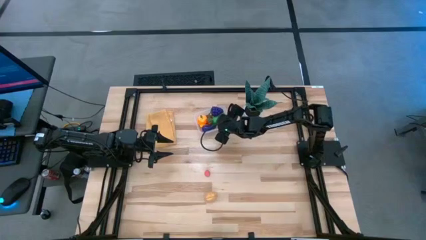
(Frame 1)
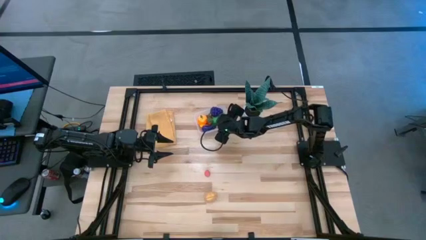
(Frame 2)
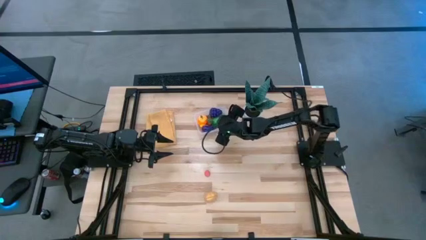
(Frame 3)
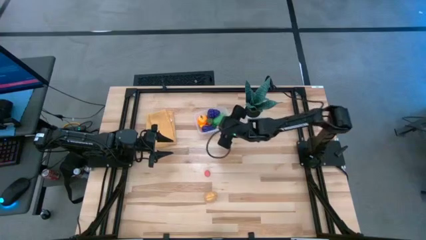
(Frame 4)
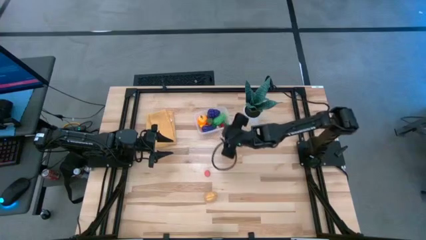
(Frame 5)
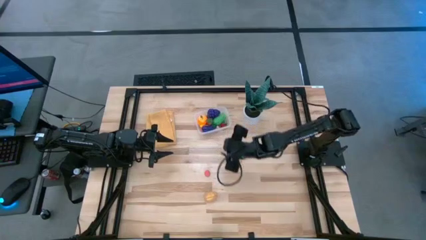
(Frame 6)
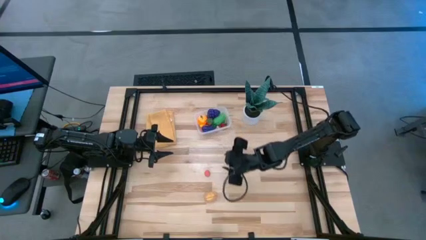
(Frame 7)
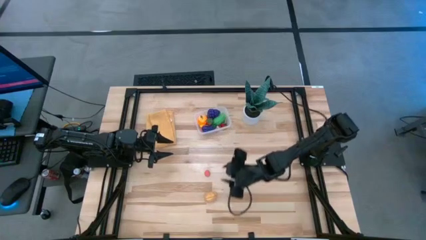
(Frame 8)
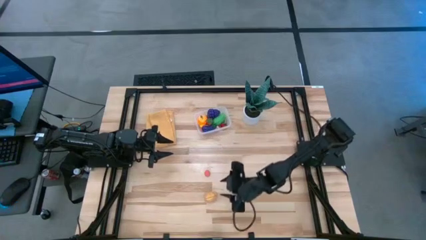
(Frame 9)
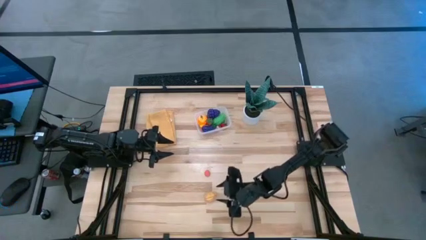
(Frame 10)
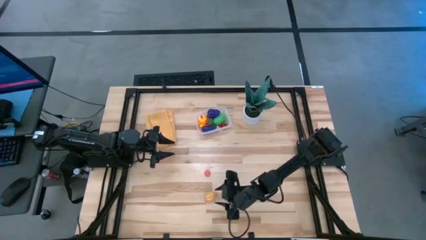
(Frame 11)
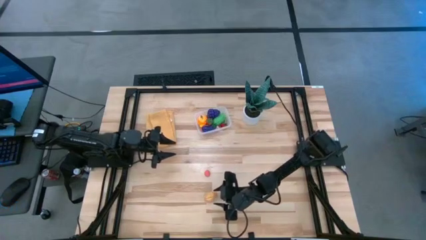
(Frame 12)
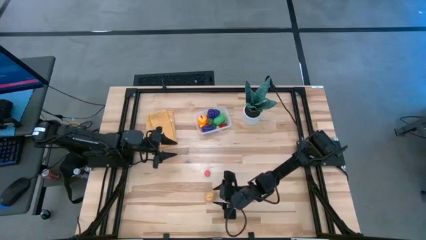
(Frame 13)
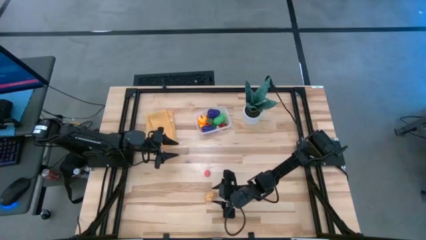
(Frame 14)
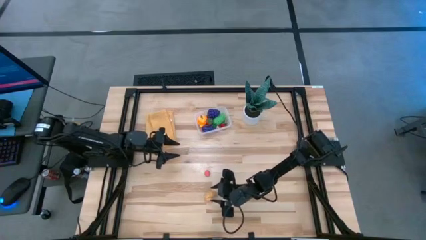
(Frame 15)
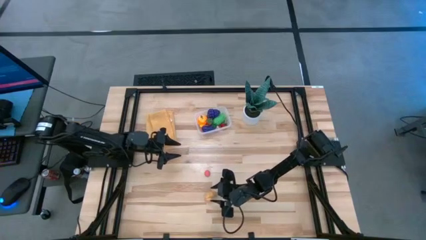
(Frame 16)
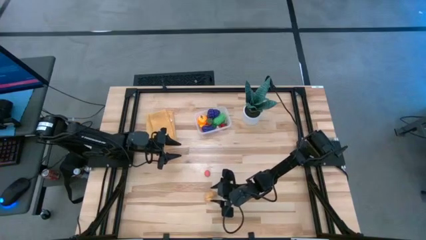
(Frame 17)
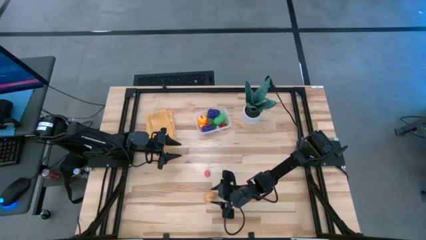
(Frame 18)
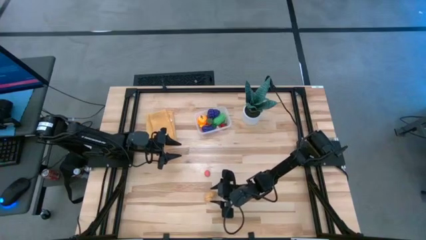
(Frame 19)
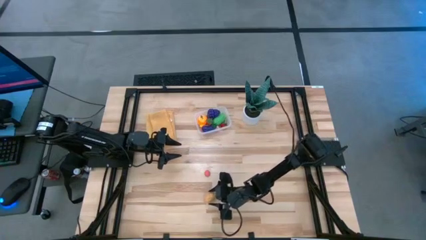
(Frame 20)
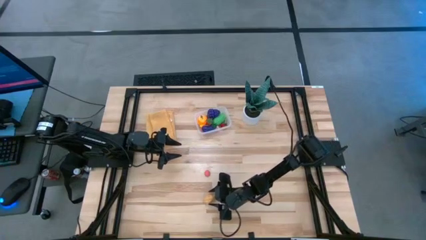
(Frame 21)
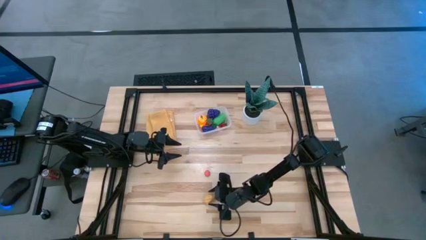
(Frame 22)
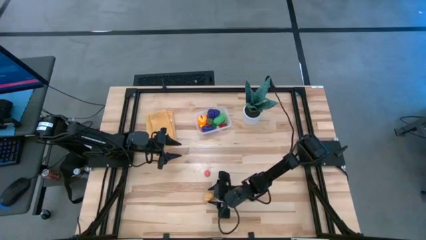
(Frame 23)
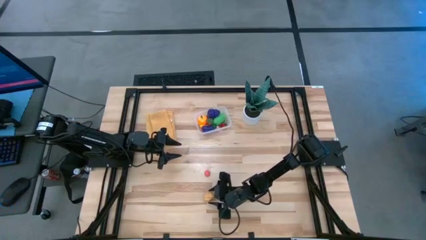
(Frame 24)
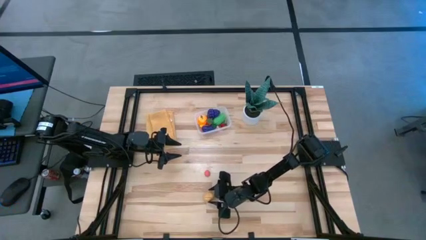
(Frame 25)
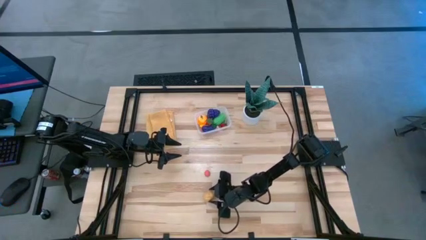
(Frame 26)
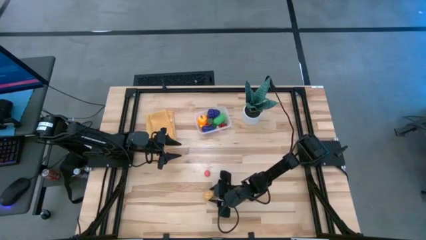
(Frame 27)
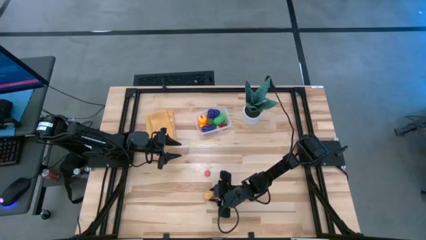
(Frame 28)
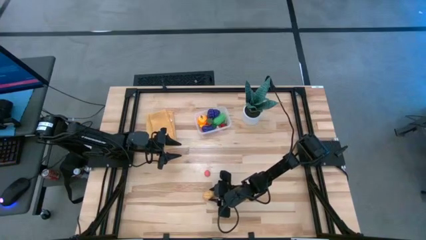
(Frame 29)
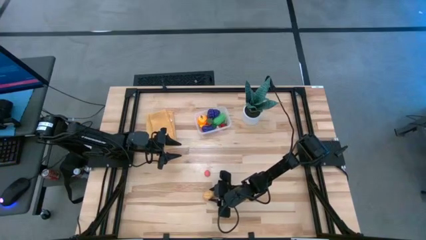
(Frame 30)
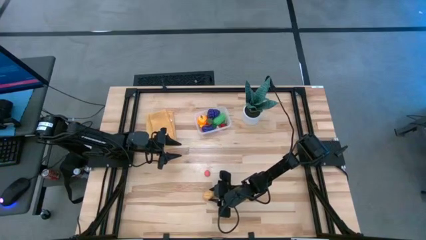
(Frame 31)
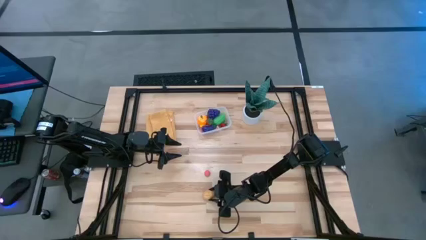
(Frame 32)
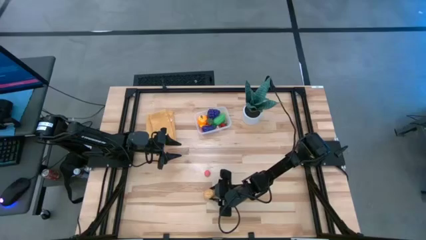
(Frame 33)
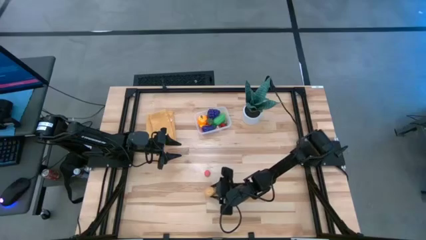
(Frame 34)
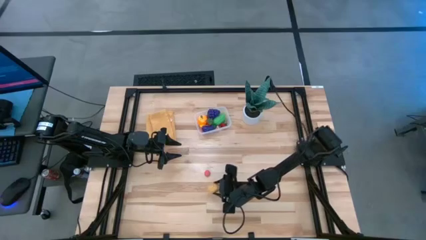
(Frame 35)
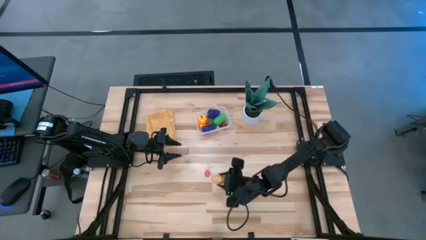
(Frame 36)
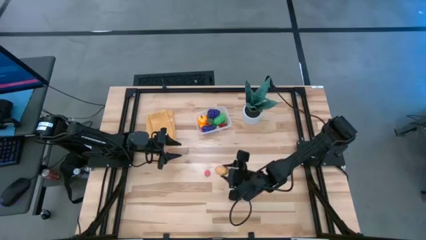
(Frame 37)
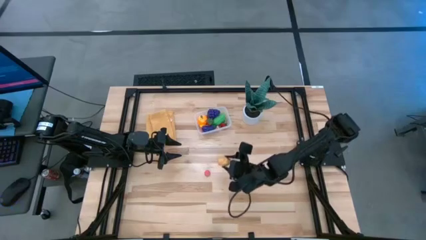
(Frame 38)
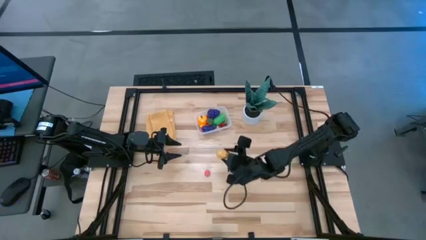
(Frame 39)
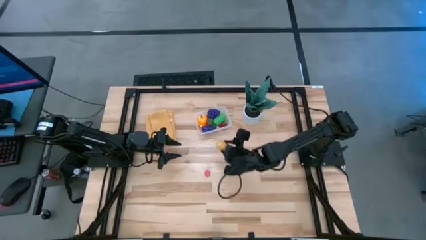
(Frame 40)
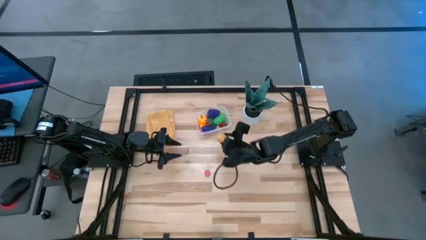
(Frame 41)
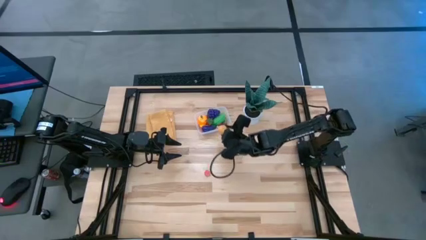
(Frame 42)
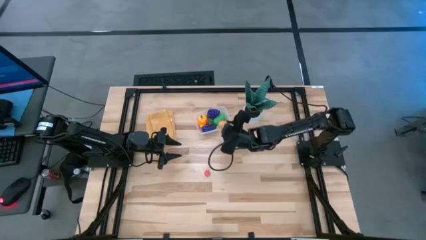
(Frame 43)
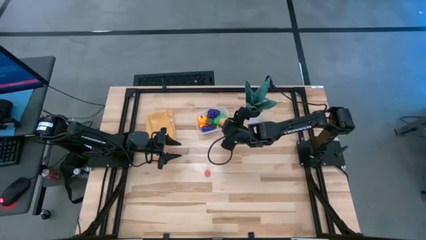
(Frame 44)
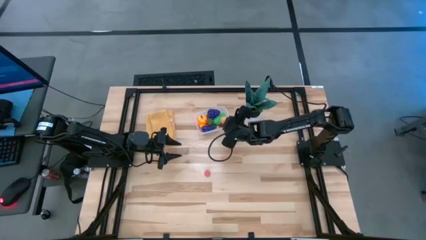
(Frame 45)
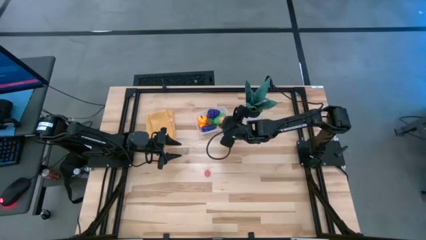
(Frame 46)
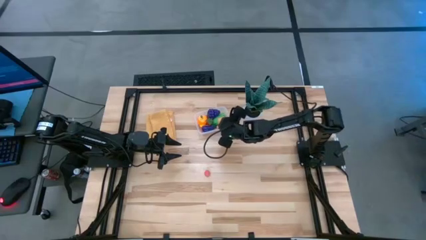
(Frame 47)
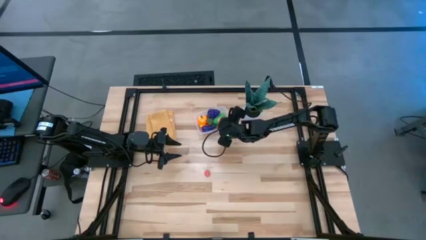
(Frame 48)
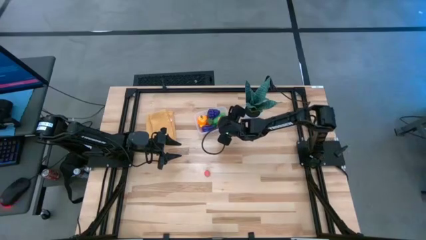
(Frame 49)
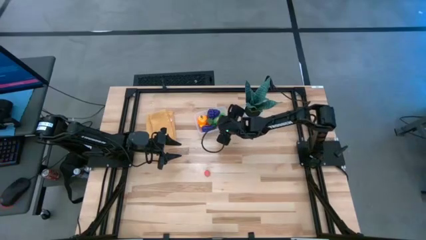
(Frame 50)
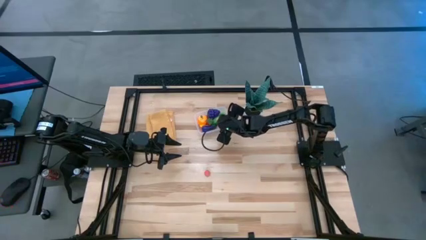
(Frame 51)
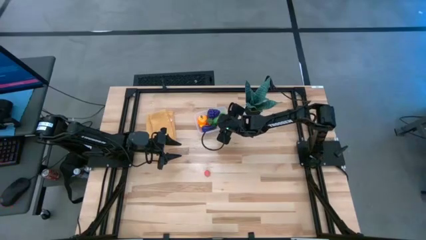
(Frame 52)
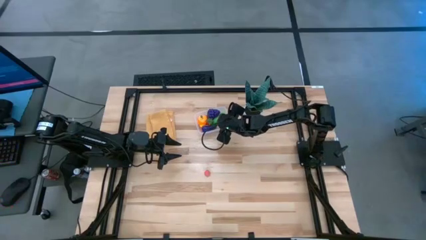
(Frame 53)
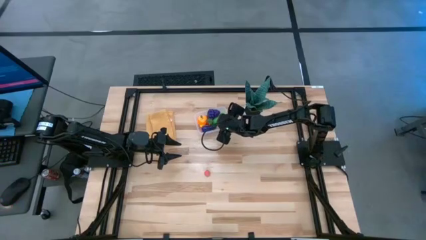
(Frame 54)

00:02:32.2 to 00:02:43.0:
Task: Pick and placing Produce into tupperware
Put the potato into the transparent bin

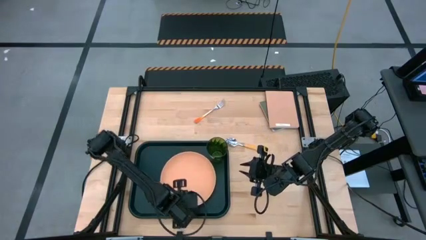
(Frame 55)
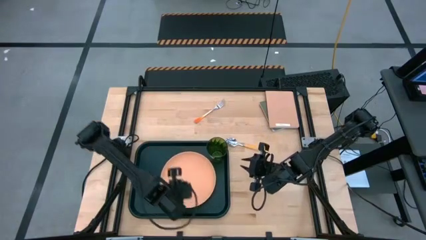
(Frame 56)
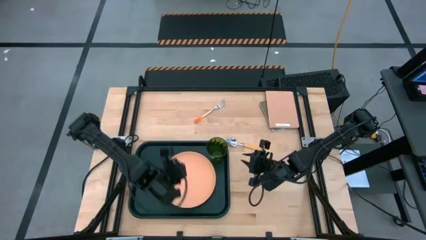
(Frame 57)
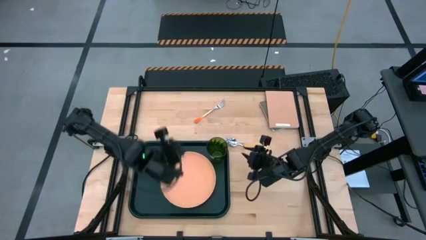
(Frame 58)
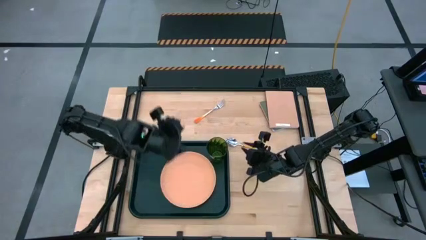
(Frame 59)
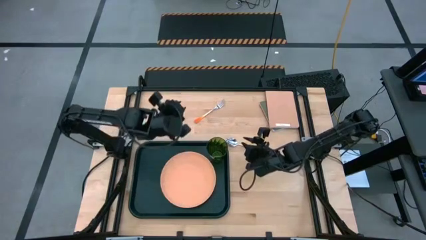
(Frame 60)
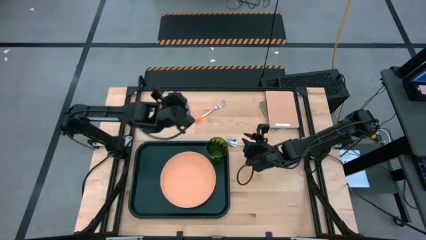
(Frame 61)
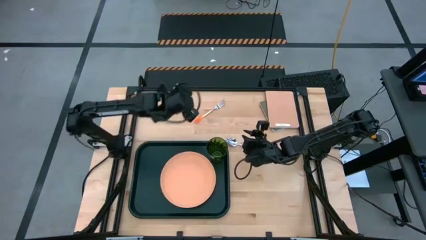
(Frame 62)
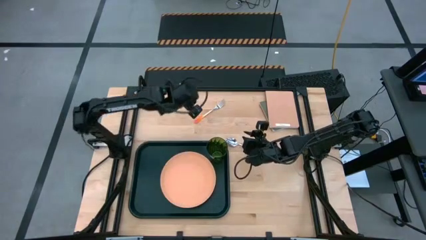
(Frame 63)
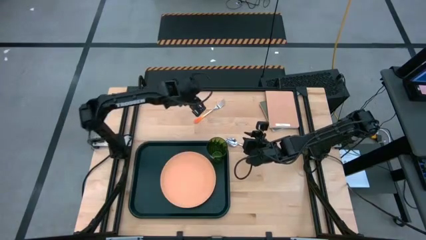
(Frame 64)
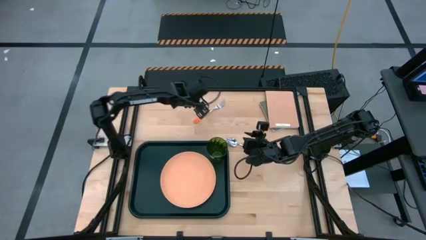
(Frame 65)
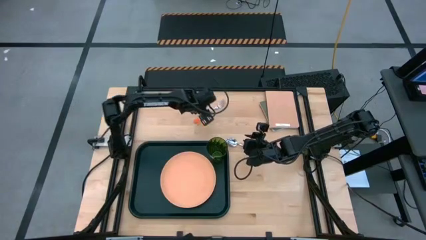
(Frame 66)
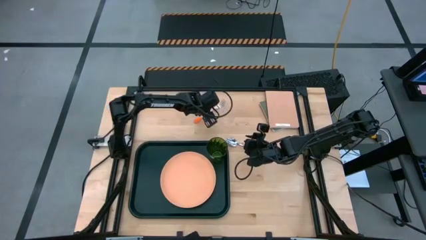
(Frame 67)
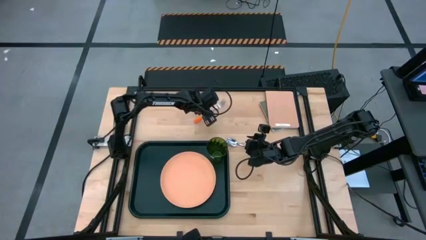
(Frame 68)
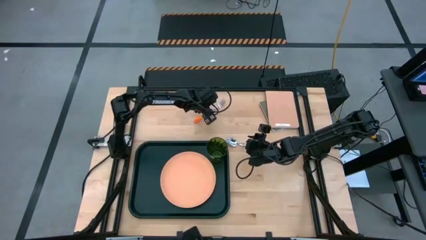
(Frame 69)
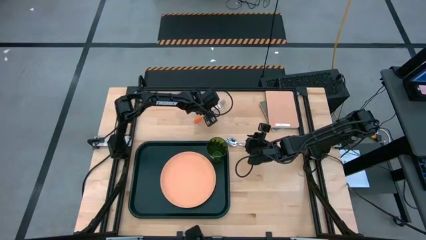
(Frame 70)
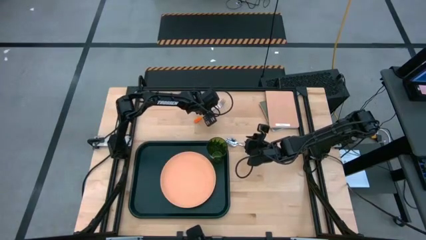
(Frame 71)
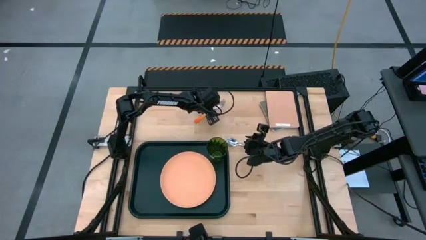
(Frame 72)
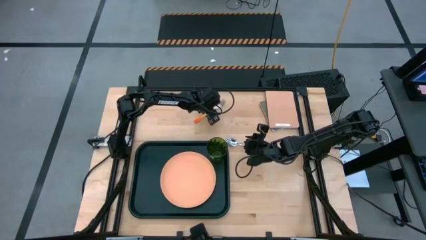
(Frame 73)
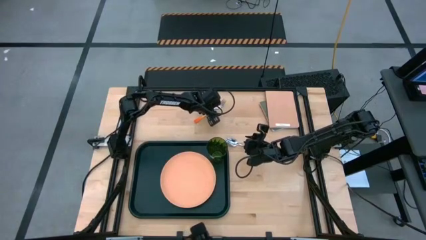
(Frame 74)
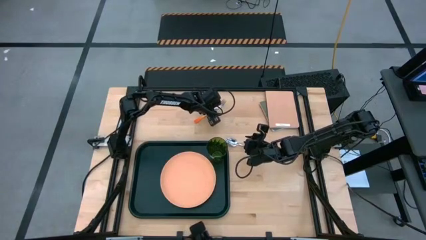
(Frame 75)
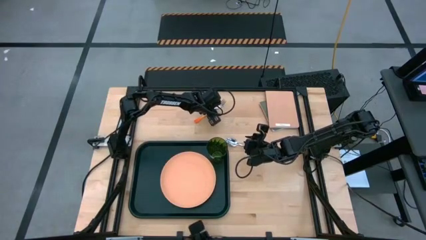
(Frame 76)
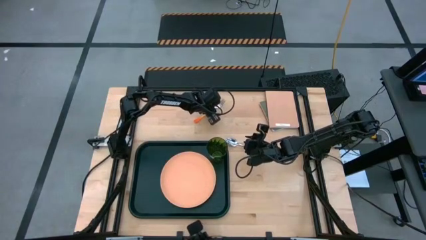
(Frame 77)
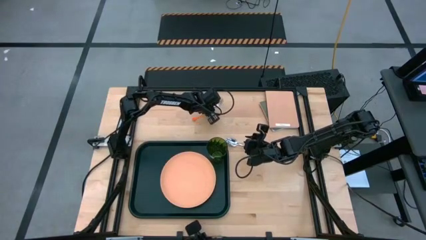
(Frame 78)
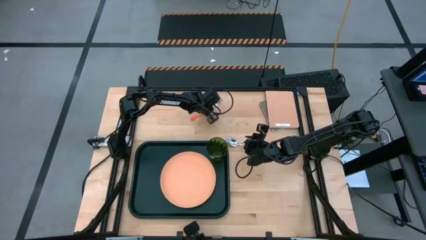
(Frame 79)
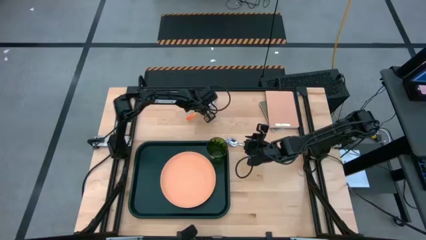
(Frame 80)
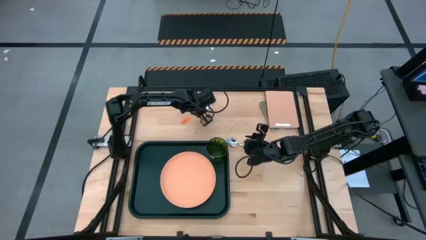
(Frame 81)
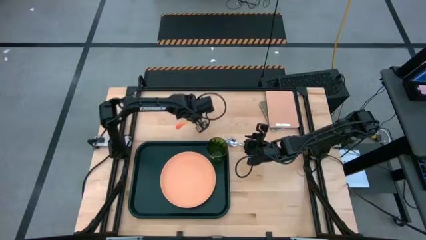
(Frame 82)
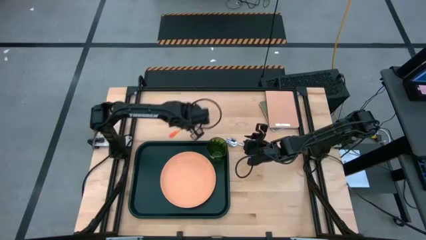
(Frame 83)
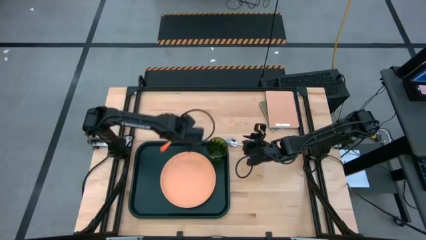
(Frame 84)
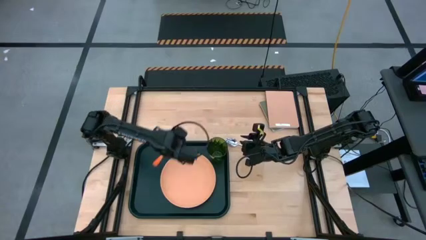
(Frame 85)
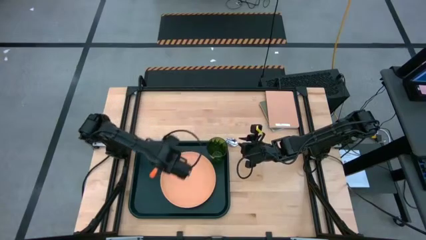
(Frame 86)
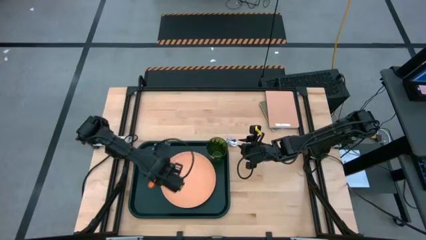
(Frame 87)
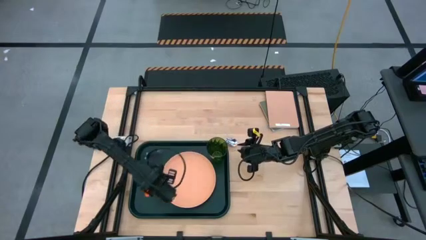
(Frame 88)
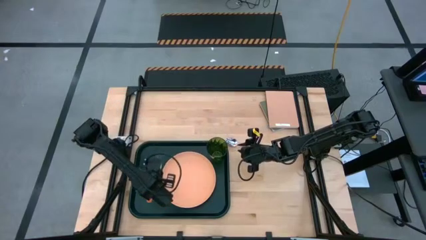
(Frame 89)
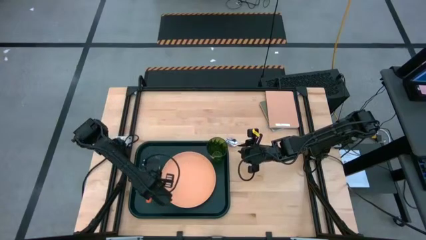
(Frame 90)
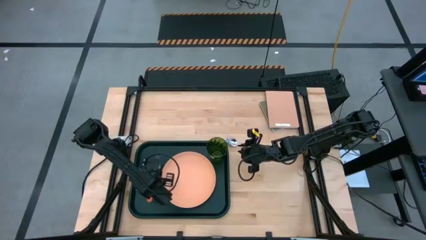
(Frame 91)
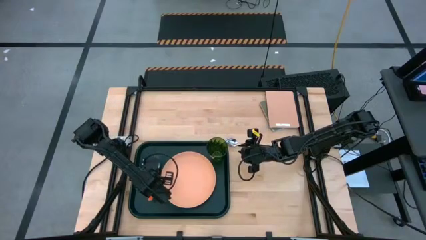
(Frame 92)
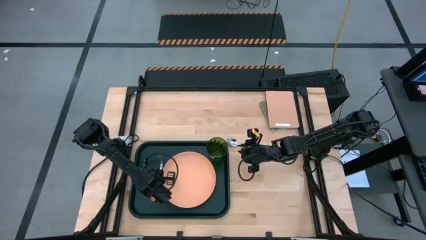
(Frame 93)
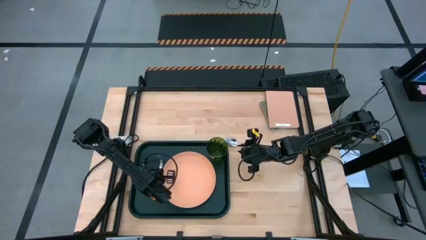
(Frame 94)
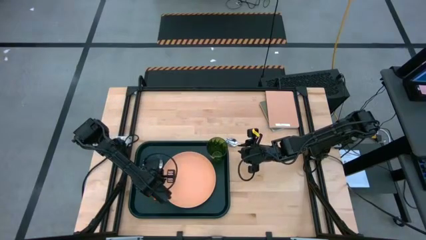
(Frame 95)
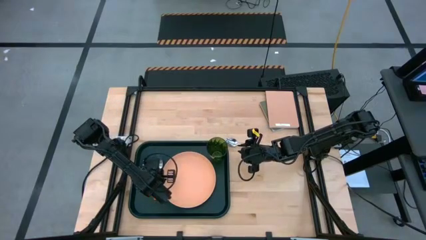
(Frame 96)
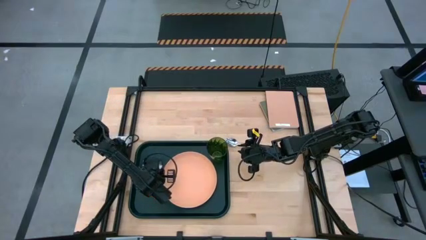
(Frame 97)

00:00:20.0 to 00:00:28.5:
Task: Pick and place plate/cup/fork/spoon on tray
Put the orange fork on the black serving tray beside the light orange plate
